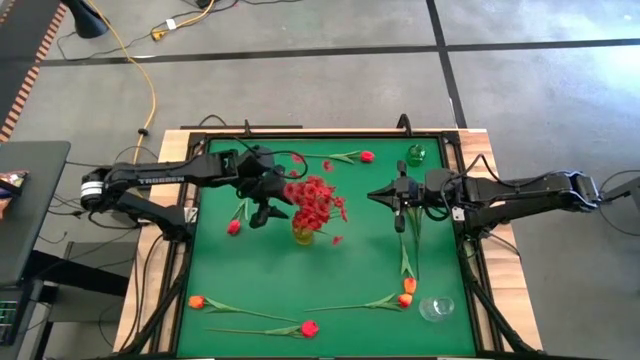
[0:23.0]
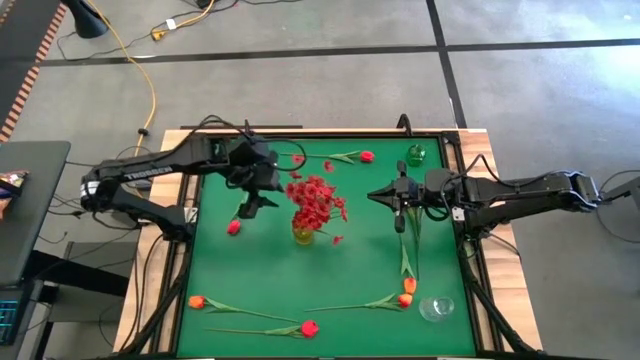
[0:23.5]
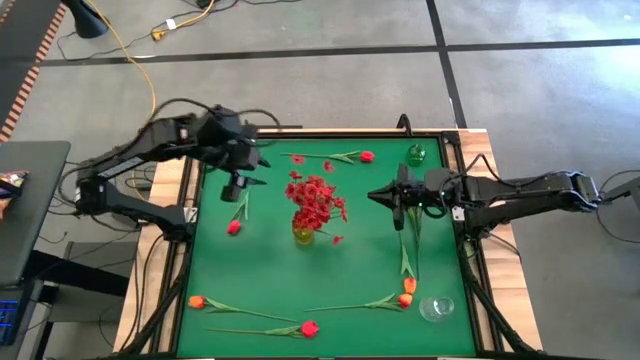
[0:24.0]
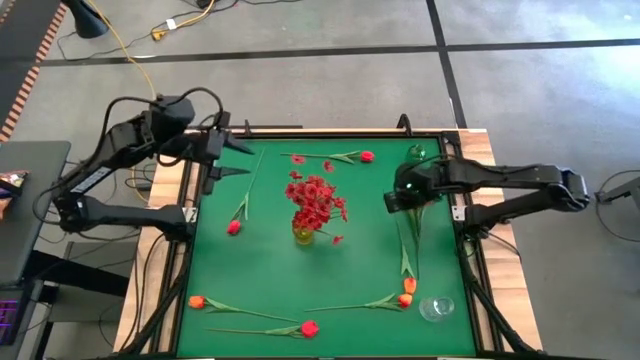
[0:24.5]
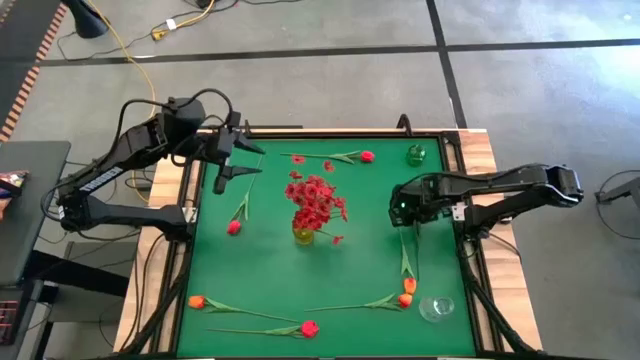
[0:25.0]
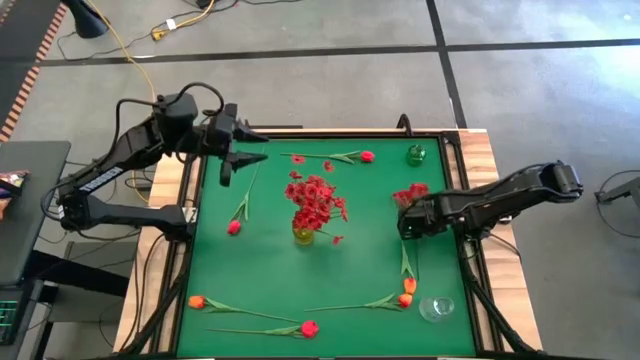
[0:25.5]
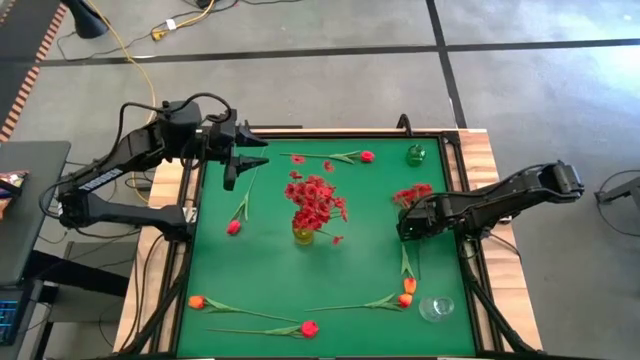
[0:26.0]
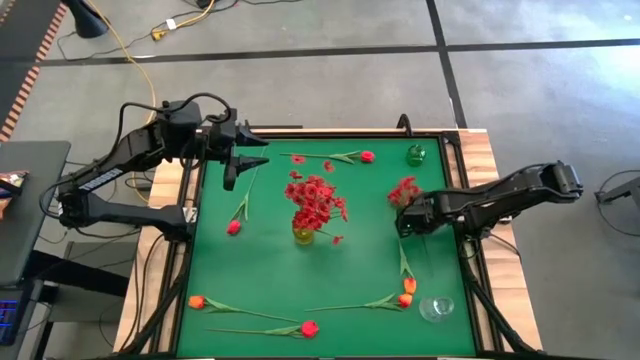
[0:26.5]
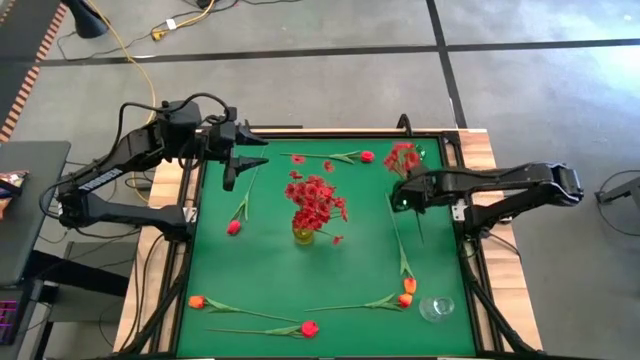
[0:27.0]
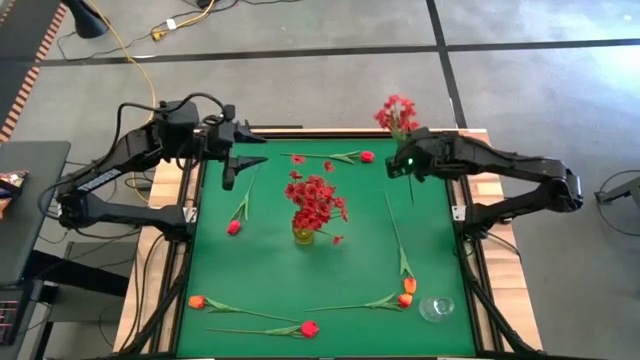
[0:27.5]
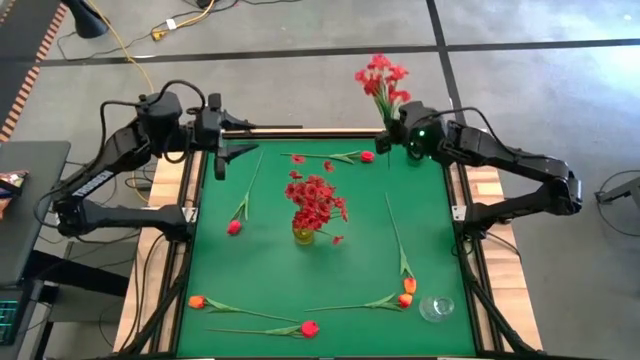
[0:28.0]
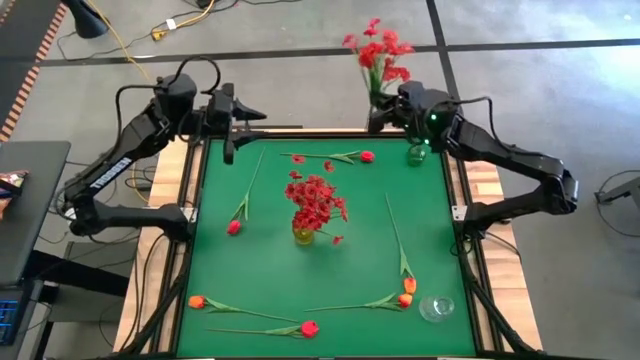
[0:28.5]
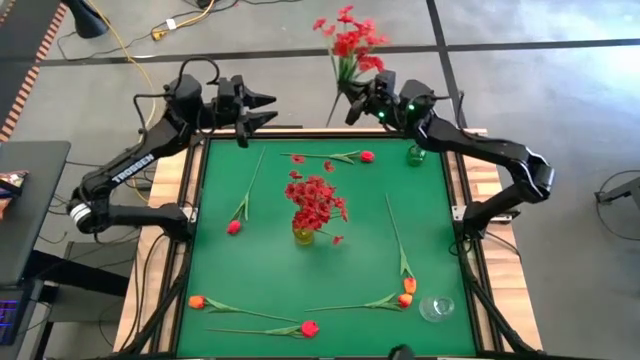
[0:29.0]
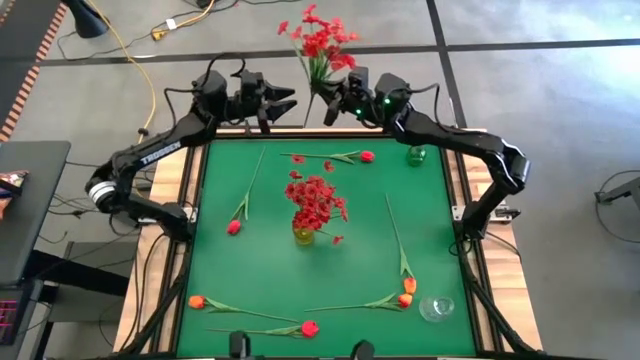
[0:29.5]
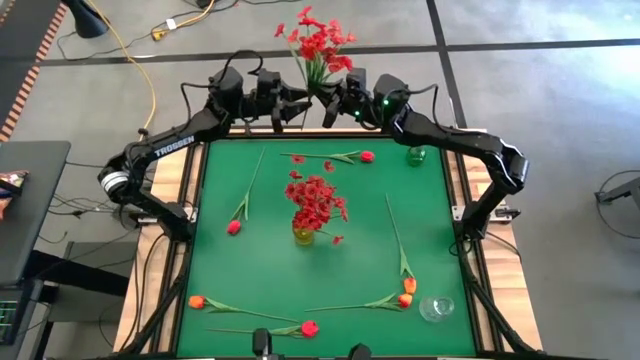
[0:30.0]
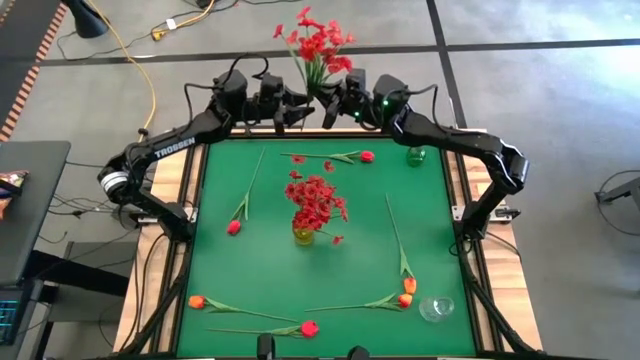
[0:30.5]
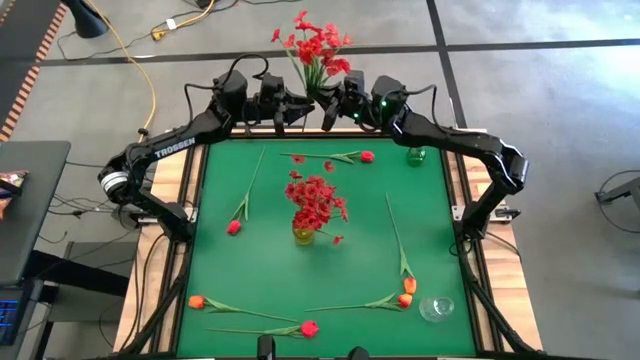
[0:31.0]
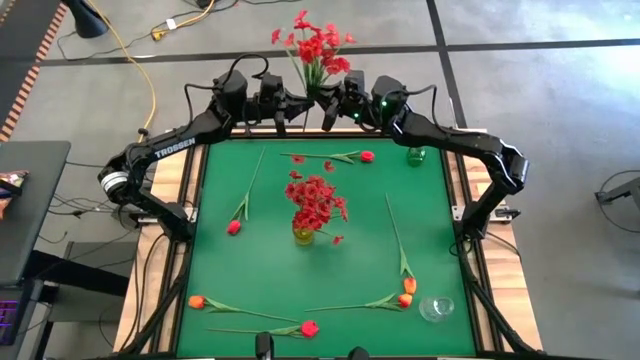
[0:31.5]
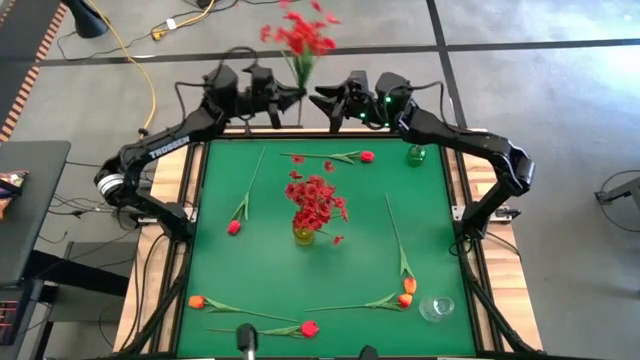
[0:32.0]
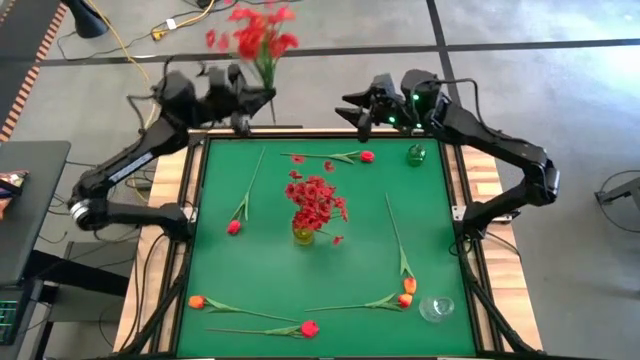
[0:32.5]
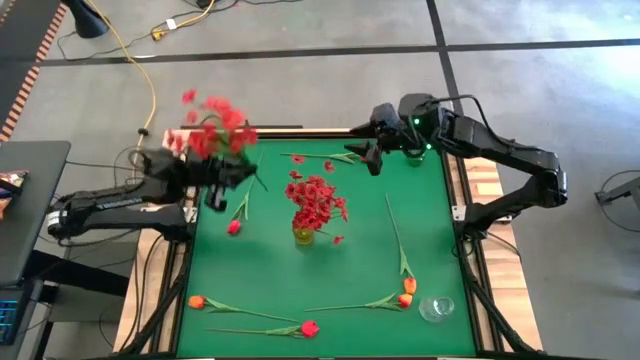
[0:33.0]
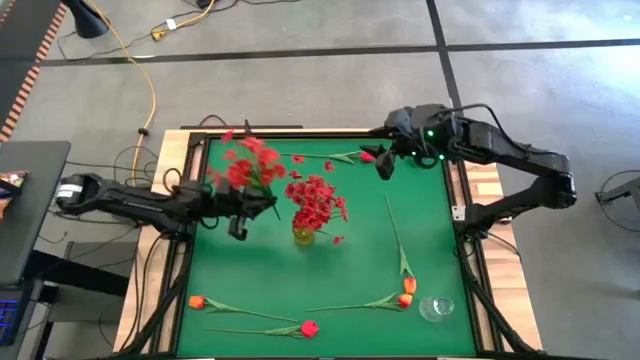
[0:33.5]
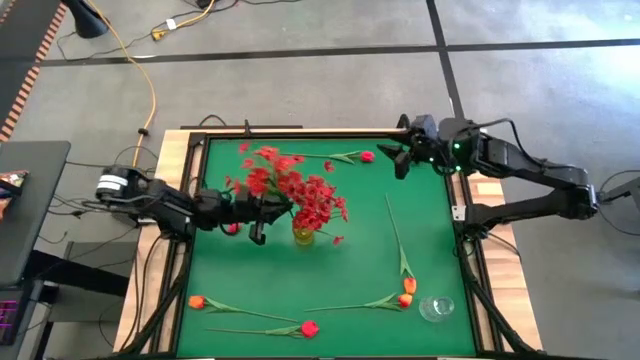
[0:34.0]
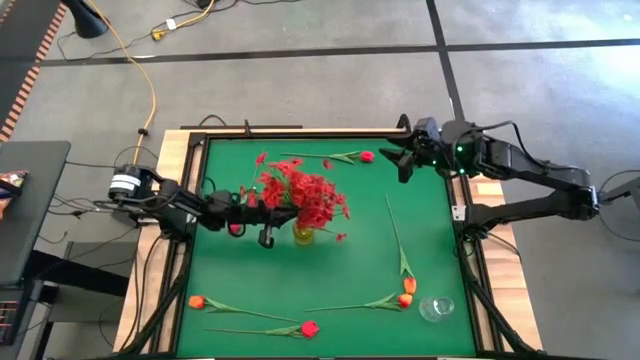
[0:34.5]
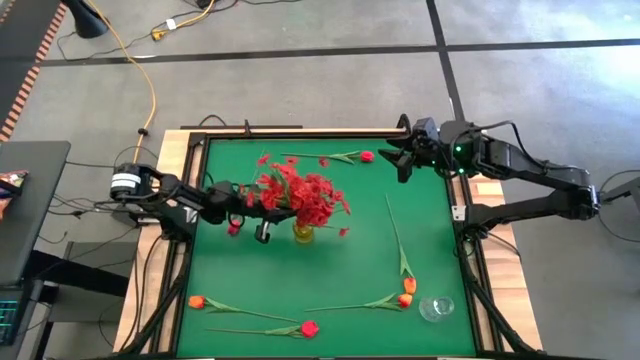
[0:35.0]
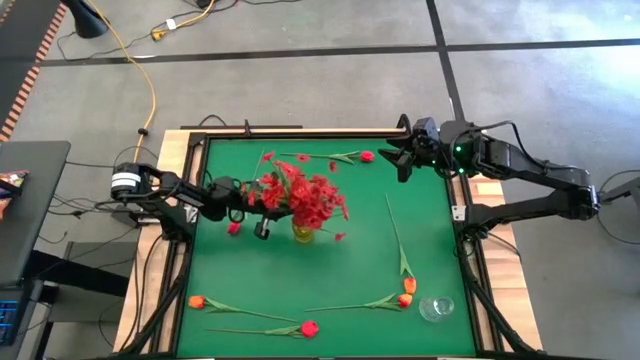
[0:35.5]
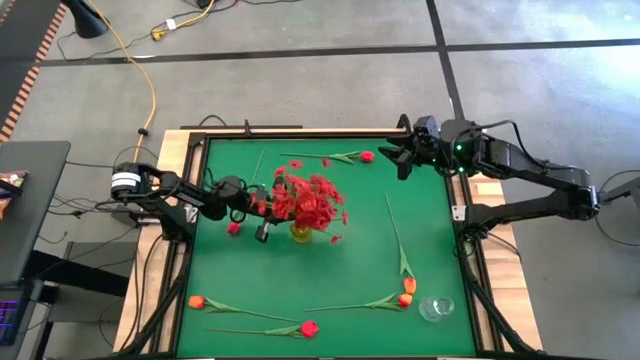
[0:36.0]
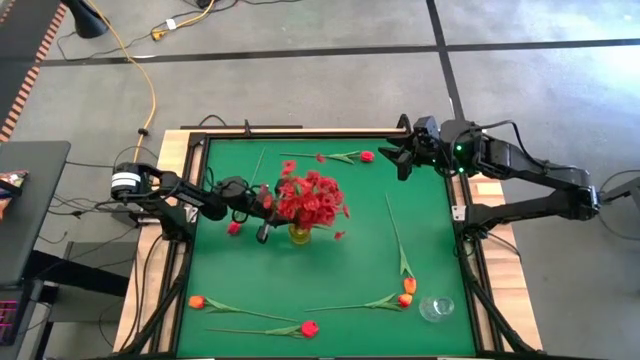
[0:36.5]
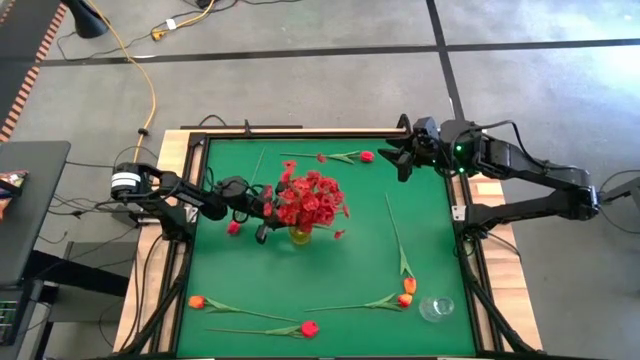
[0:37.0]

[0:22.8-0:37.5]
Task: Sort flowers into vase by color
Put the red flowers into the yellow vase

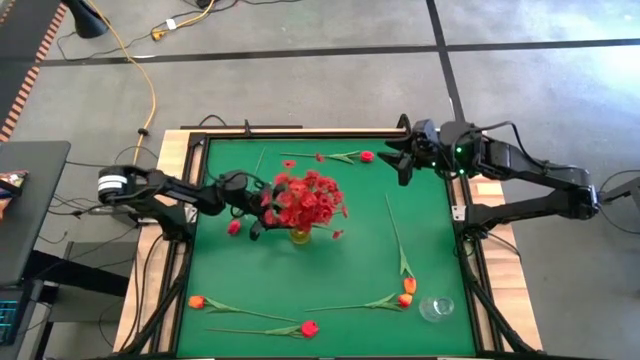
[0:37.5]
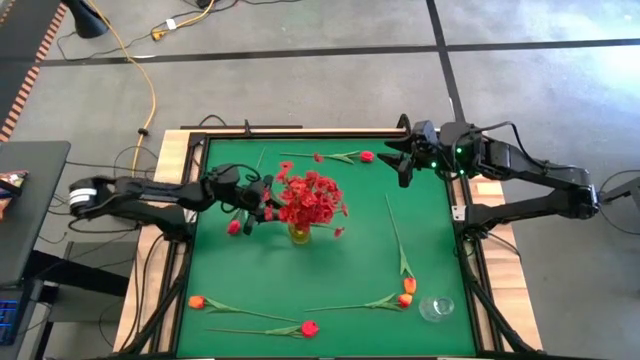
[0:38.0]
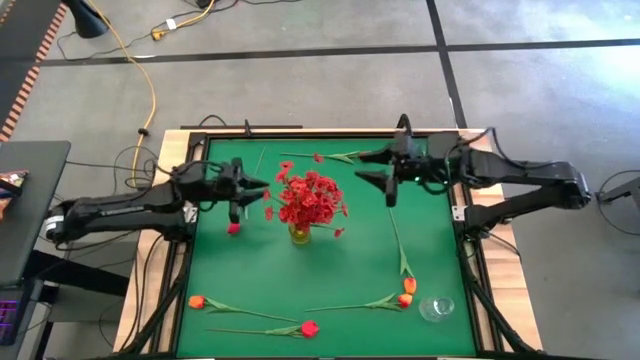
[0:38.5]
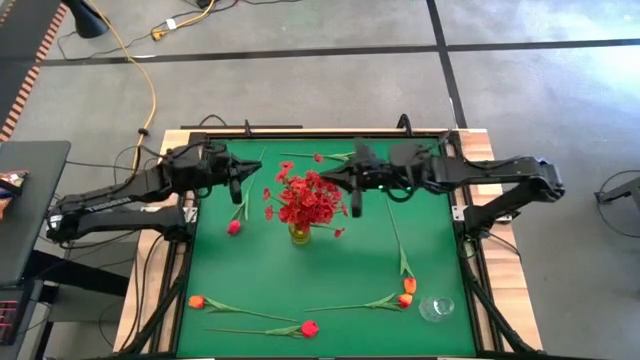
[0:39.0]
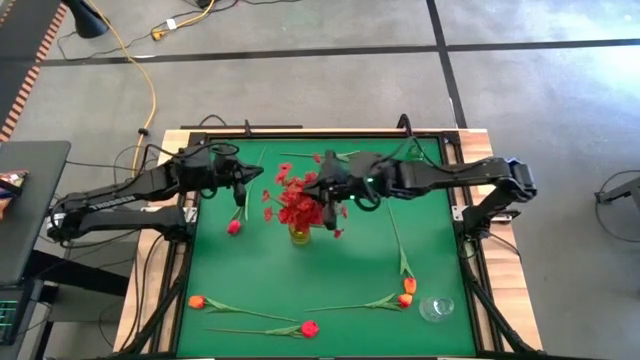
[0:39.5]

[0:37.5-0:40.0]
Adjust the red flowers in the yellow vase

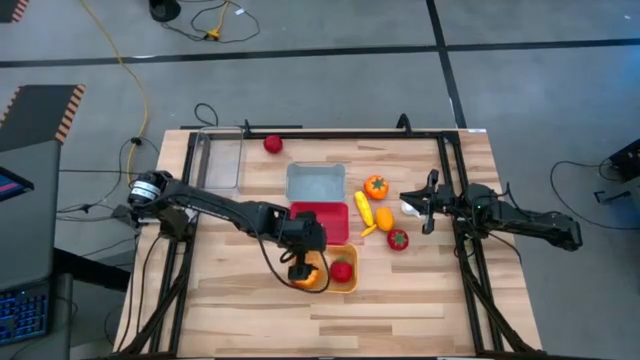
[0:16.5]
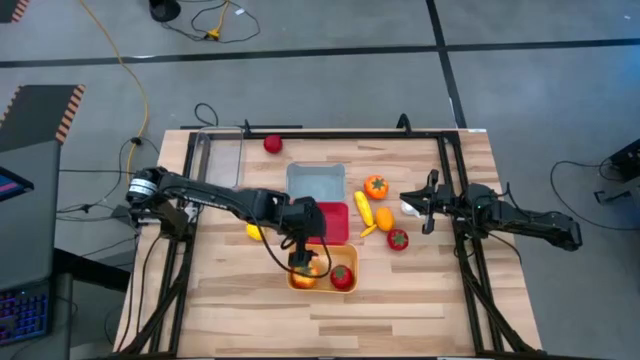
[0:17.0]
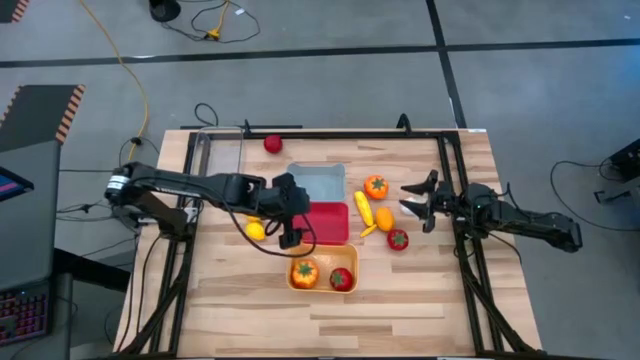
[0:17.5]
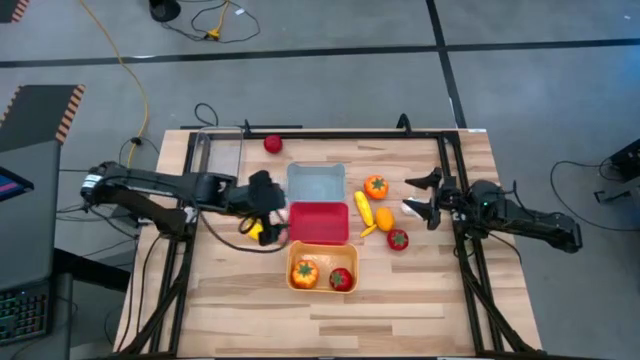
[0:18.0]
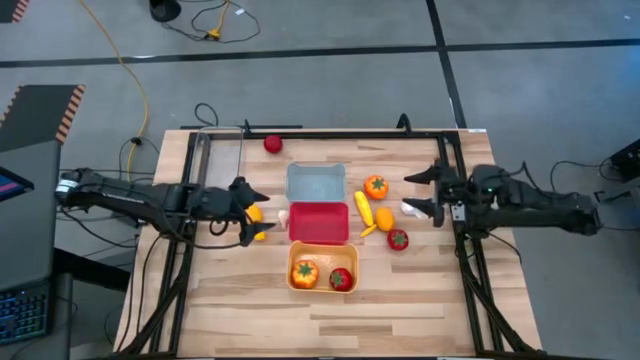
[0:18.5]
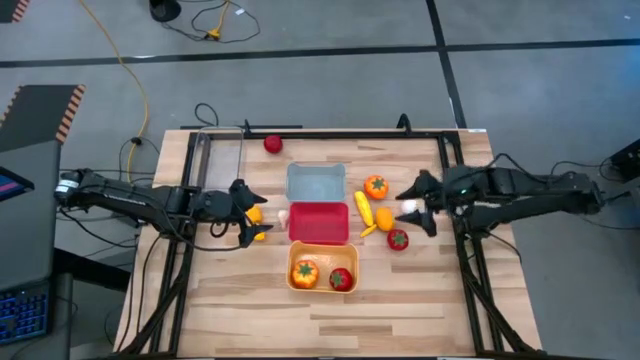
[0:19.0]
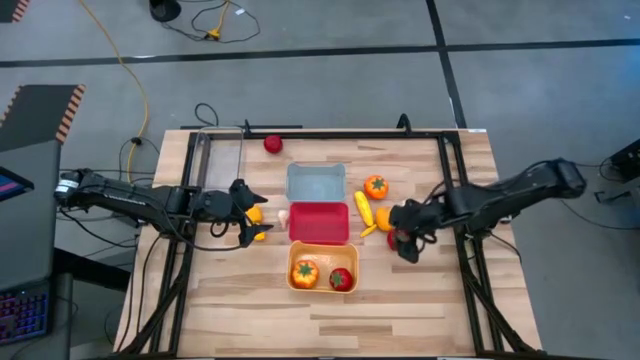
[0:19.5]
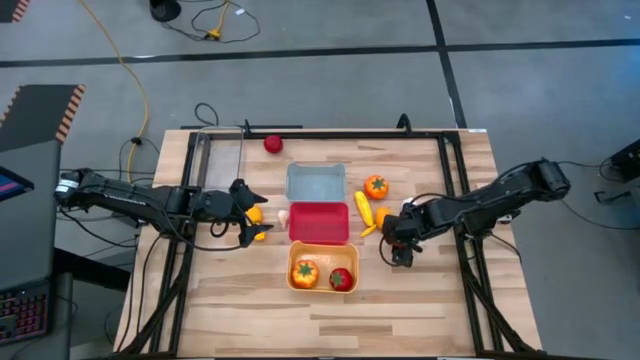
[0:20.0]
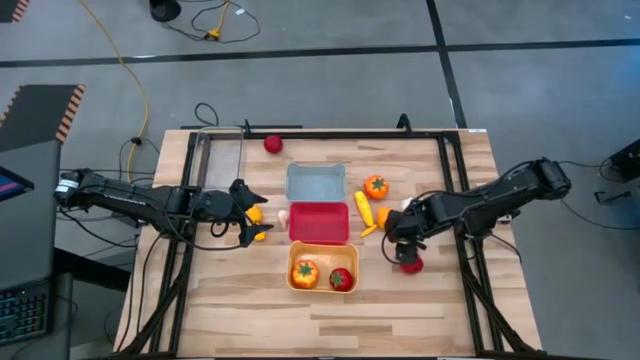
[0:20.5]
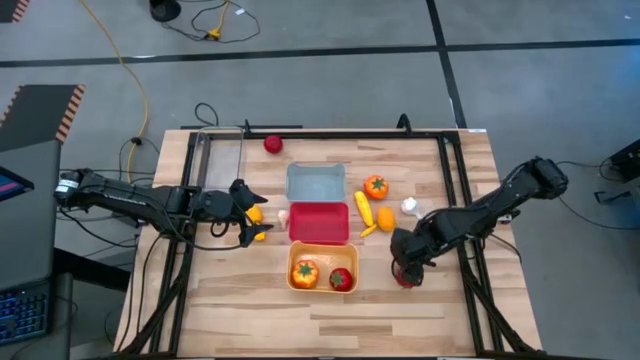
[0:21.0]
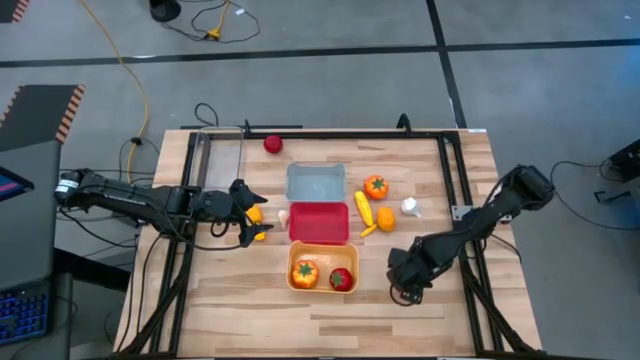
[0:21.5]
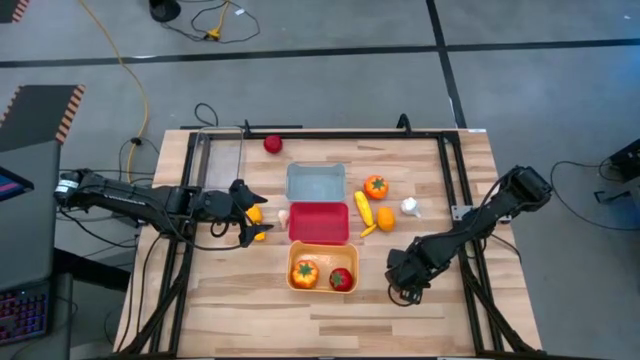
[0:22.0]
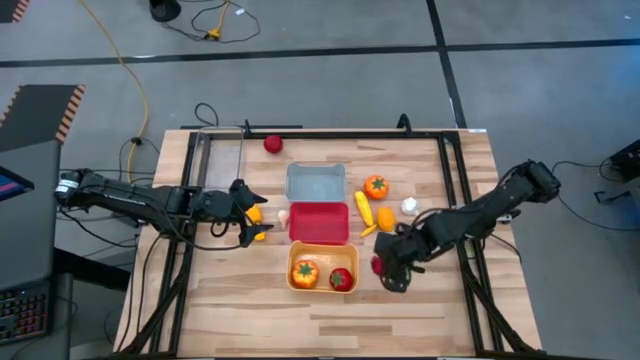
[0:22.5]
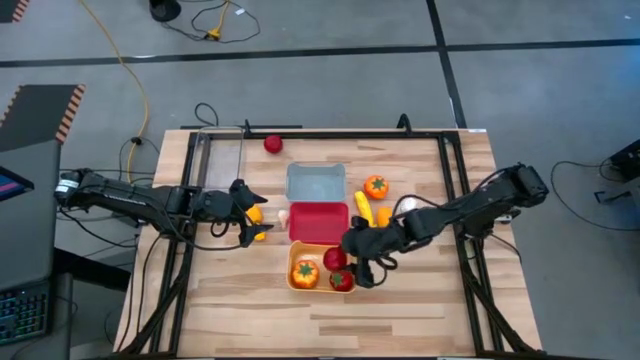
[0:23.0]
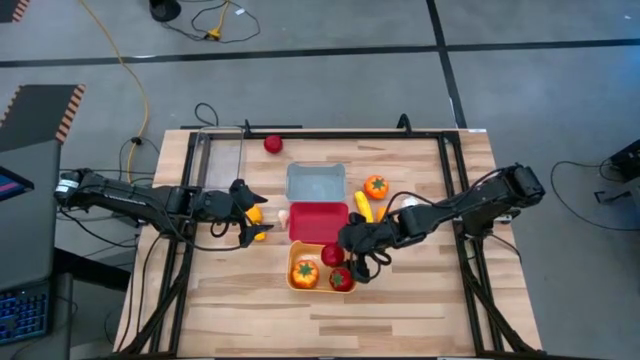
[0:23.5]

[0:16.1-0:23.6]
Task: Sort produce into baskets
Put the bottom red tomato into the yellow bin
